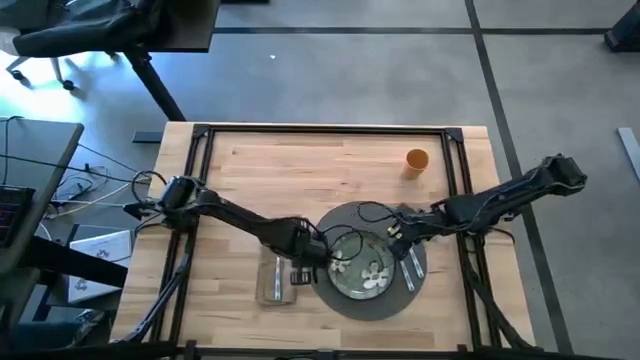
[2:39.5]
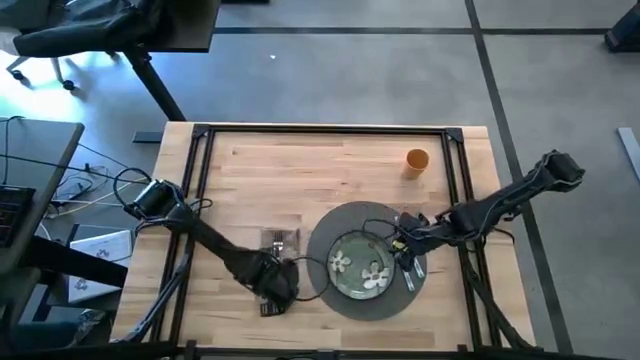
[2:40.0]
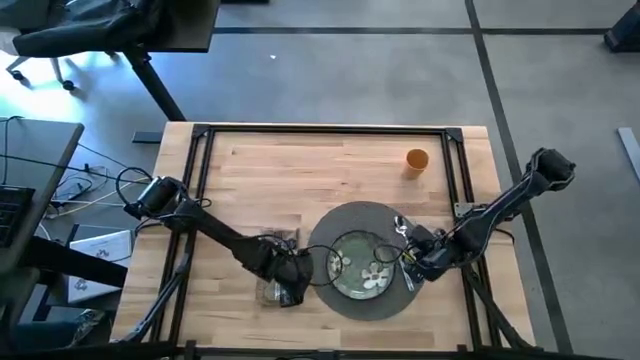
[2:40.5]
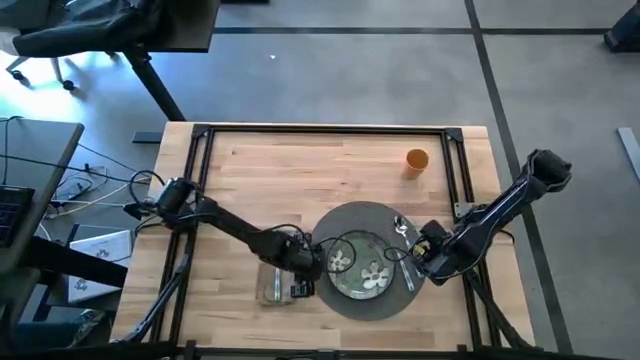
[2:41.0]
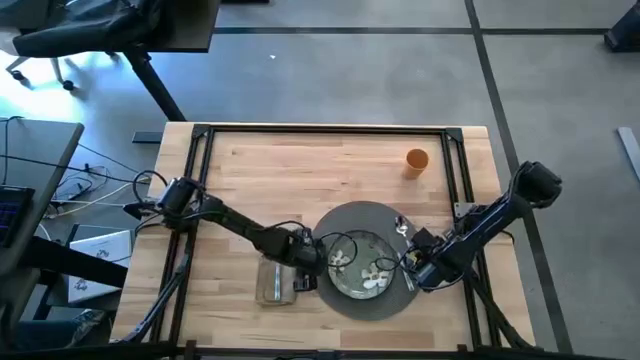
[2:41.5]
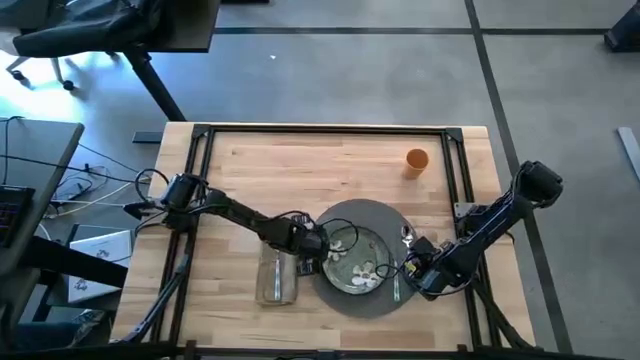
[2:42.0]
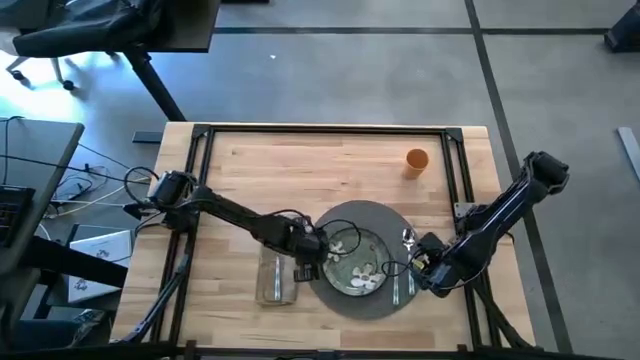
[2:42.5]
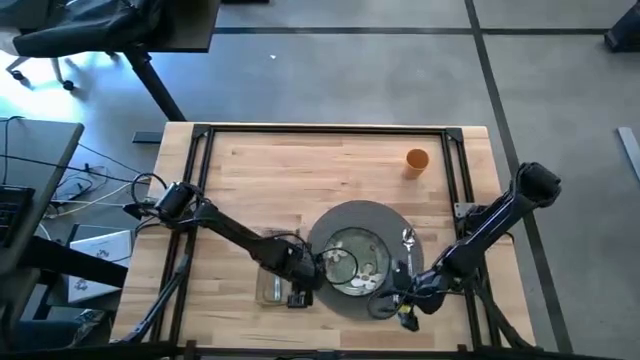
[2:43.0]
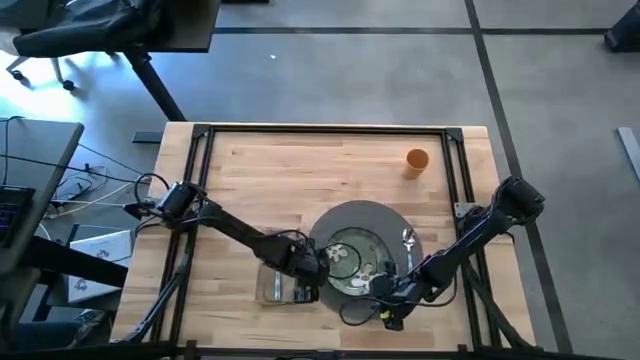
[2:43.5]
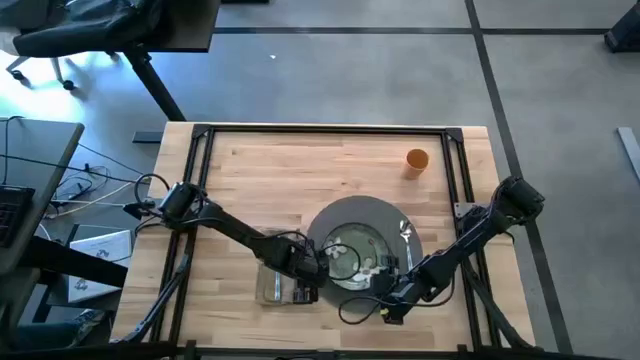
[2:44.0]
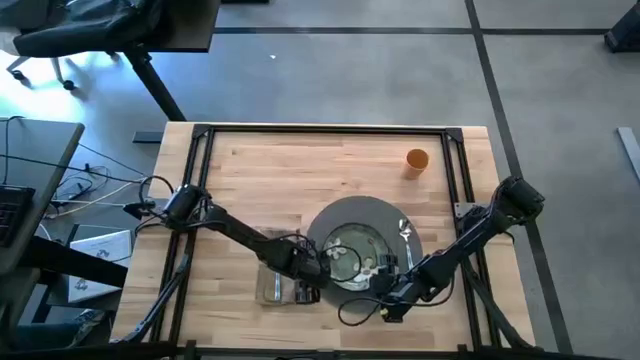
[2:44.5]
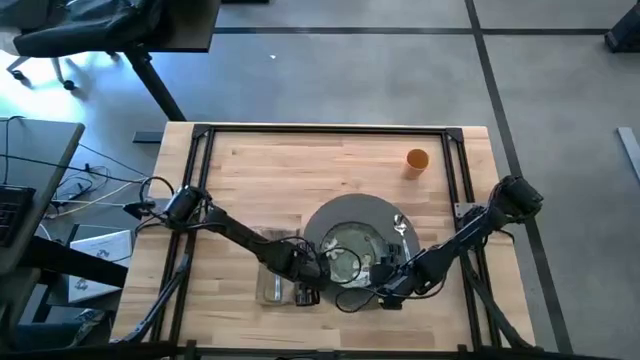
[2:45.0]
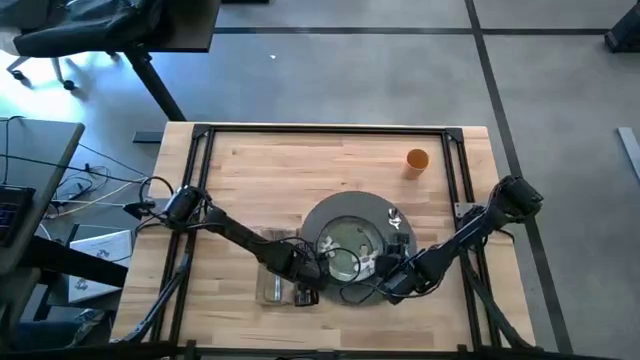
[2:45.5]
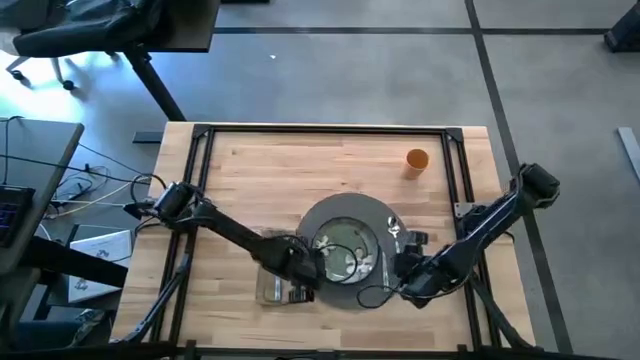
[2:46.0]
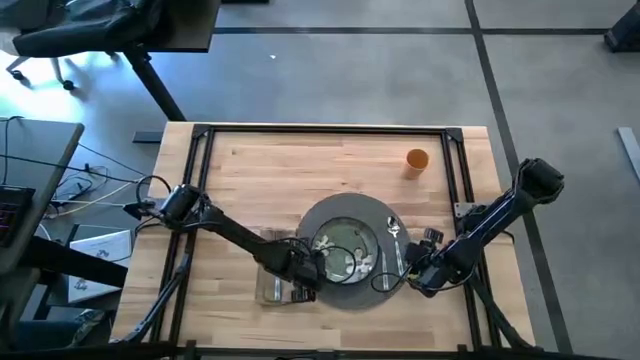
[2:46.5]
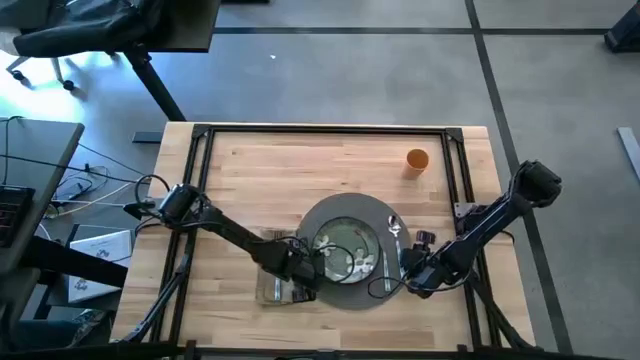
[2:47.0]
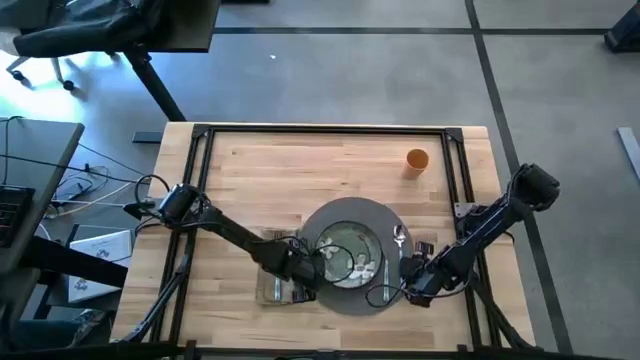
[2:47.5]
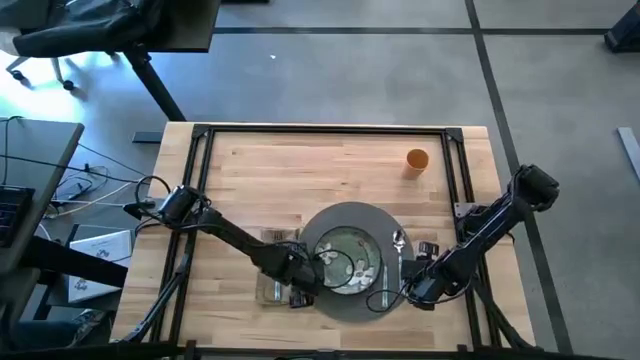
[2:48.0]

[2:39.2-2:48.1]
Task: Set table place
Adjust the gray placemat

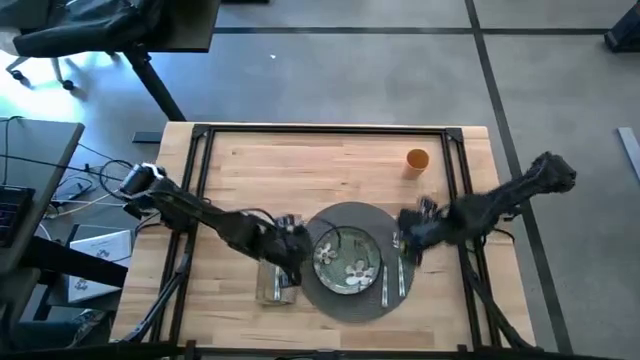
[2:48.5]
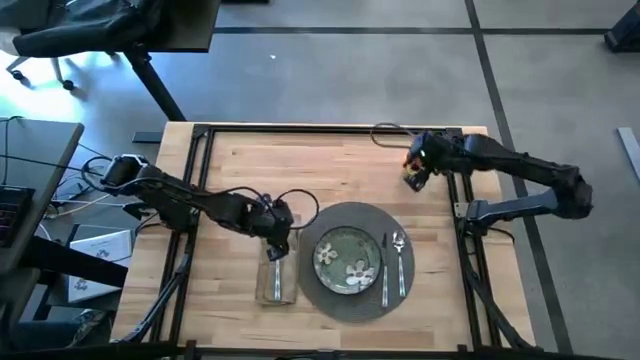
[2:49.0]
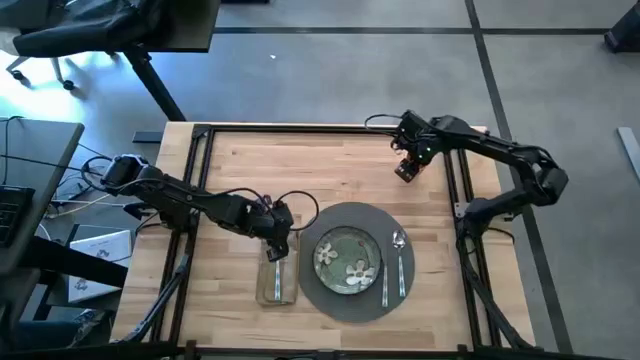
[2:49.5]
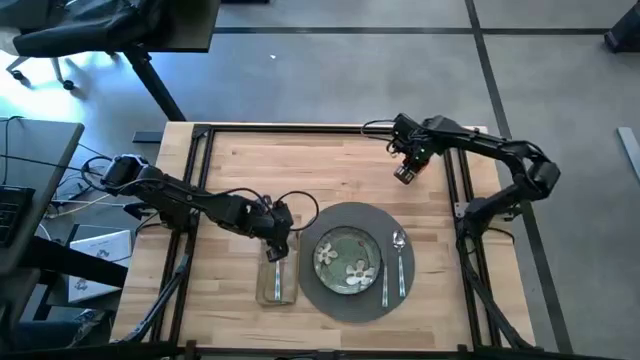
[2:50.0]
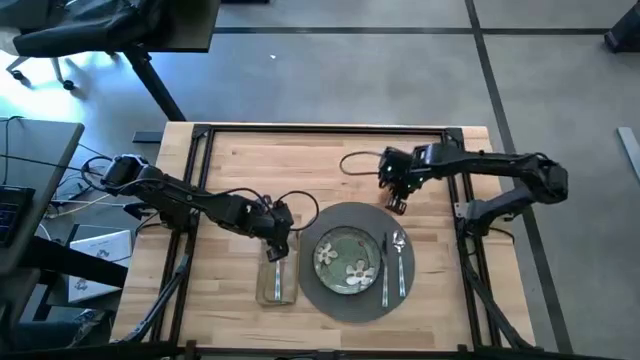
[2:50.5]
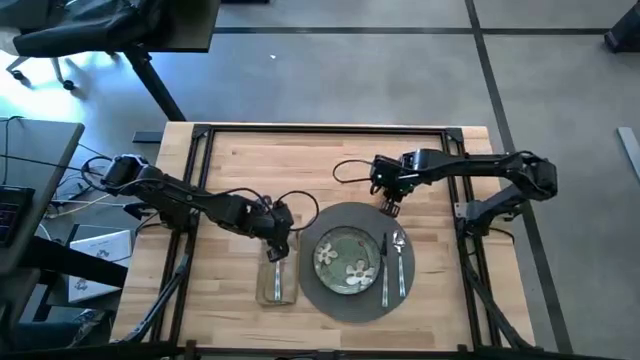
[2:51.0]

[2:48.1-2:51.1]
Put the orange cup to the top of the gray placemat

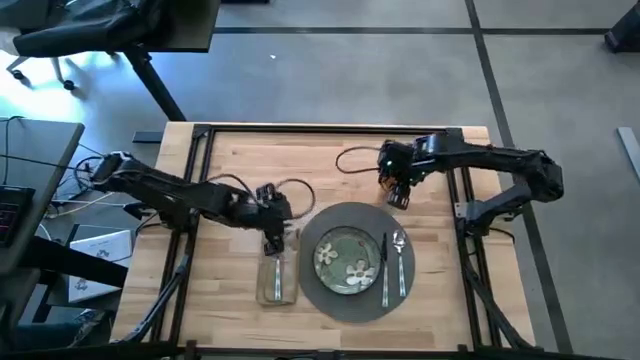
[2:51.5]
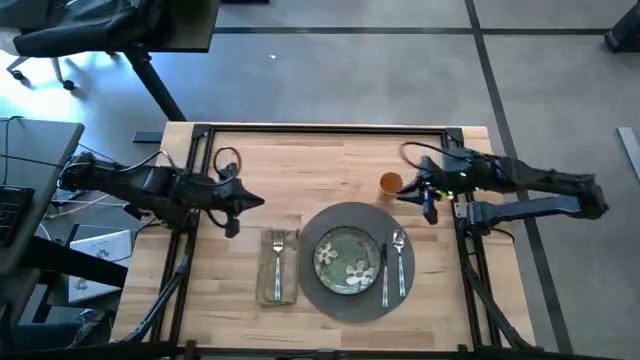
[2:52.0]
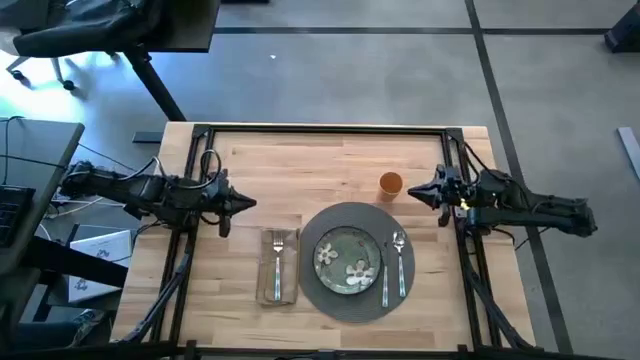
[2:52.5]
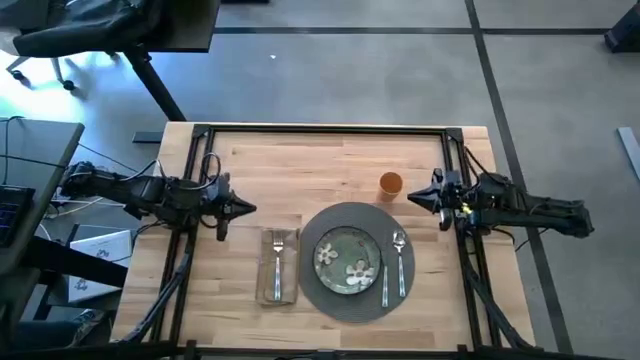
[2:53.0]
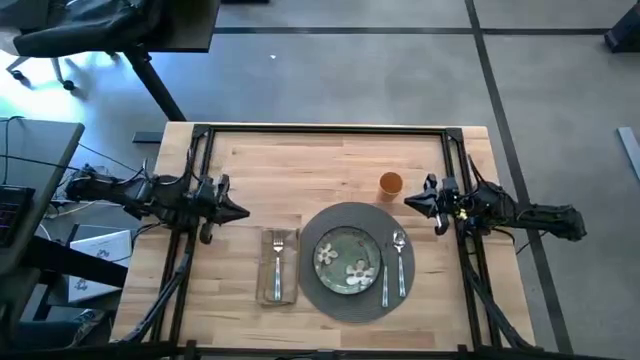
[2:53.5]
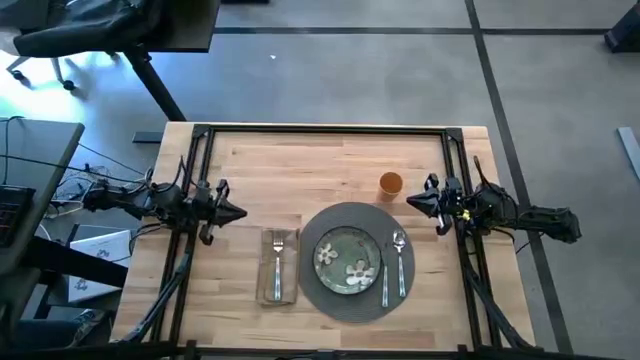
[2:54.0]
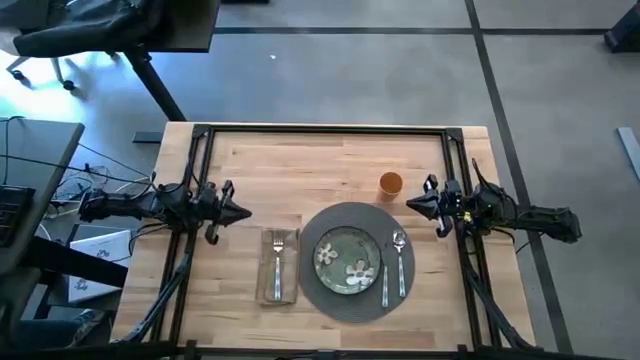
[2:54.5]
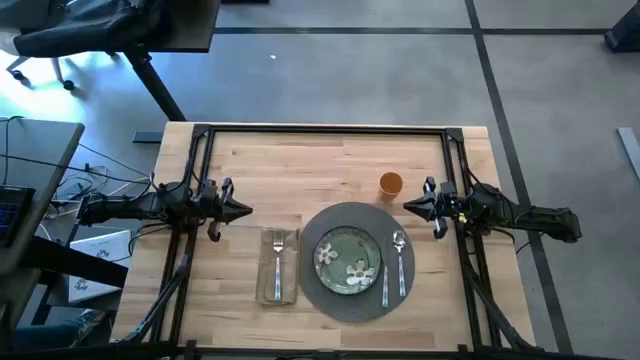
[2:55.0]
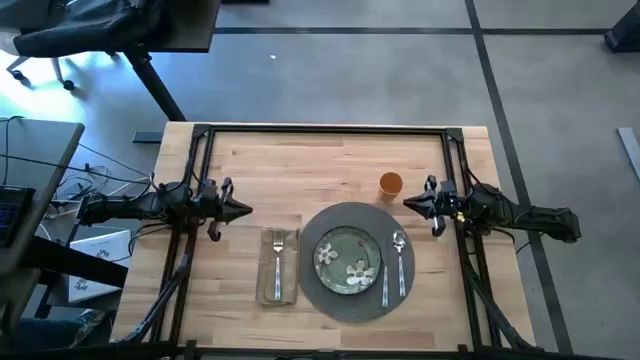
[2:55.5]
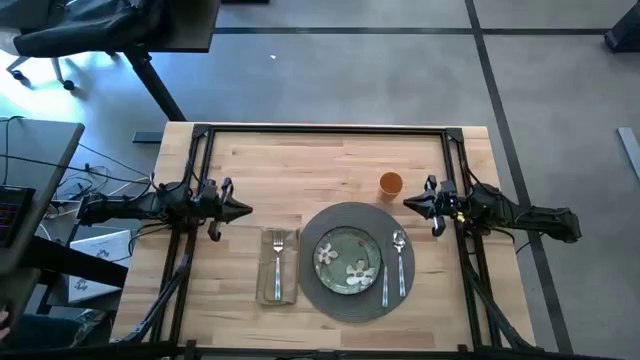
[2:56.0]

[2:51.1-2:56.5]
Return to Home Position

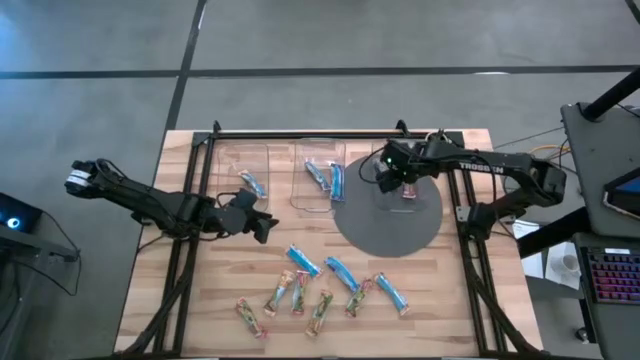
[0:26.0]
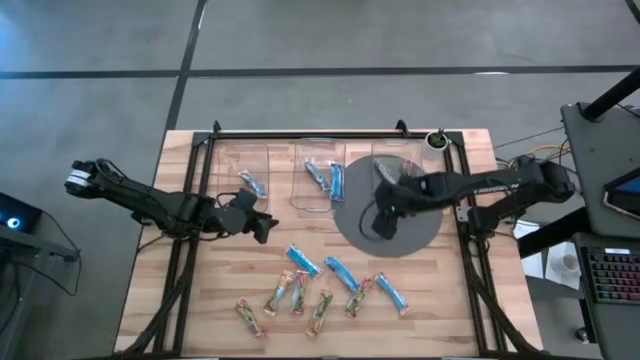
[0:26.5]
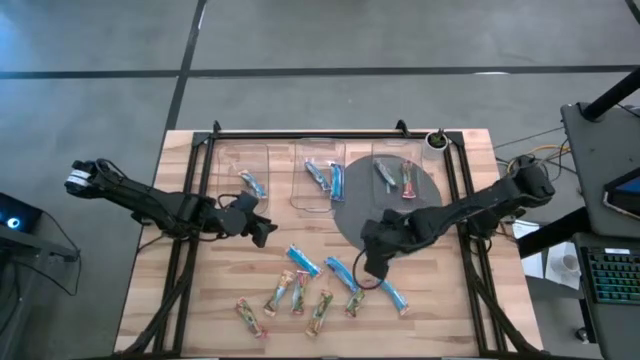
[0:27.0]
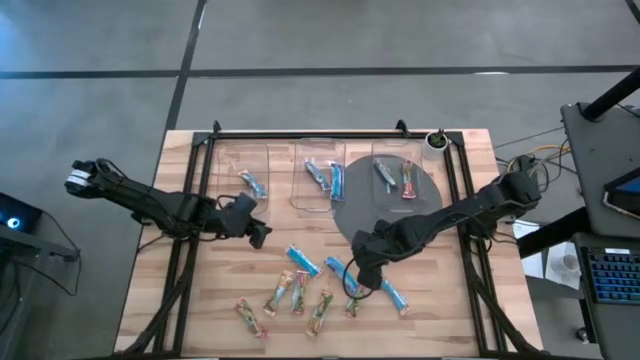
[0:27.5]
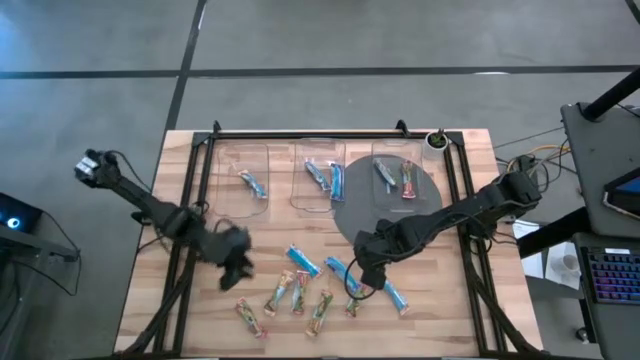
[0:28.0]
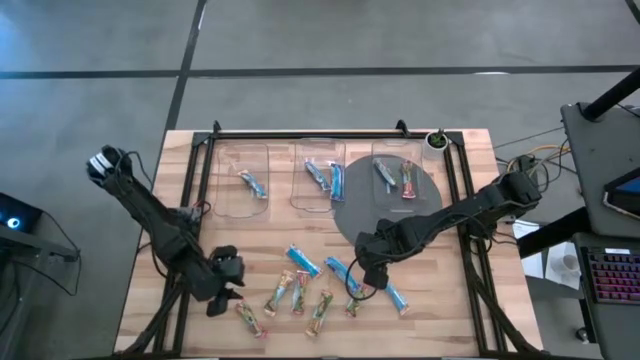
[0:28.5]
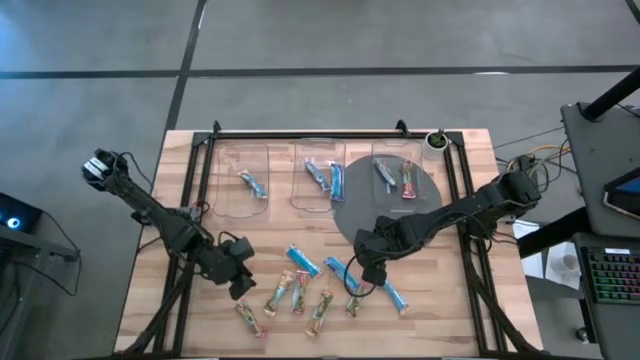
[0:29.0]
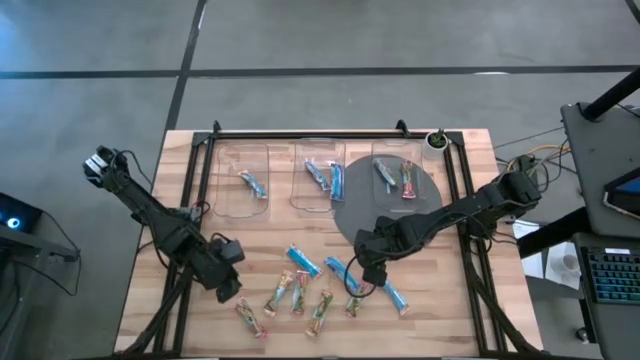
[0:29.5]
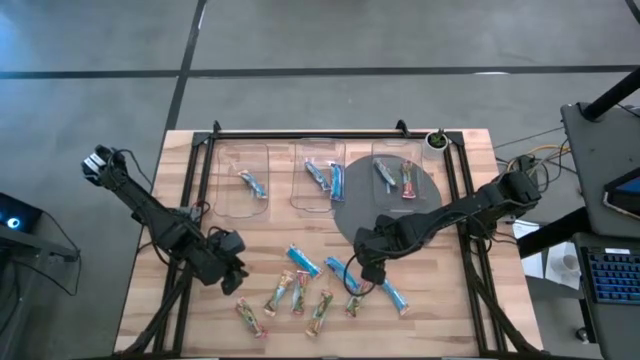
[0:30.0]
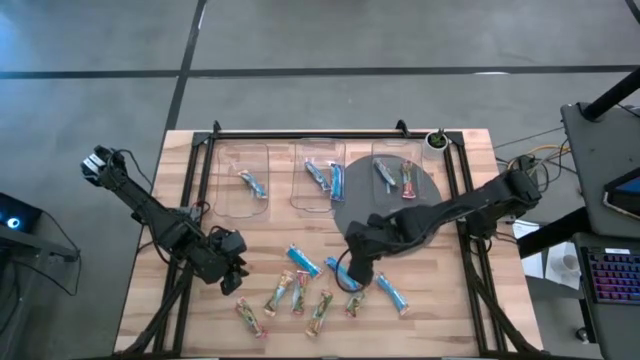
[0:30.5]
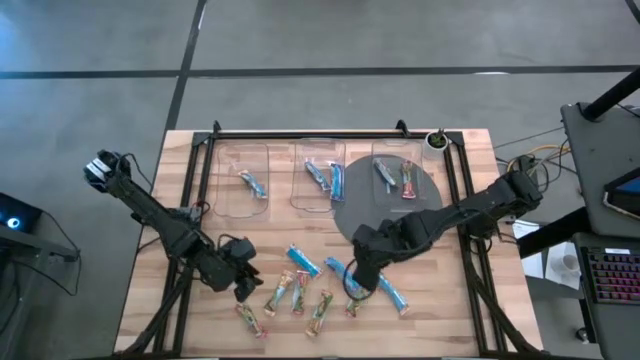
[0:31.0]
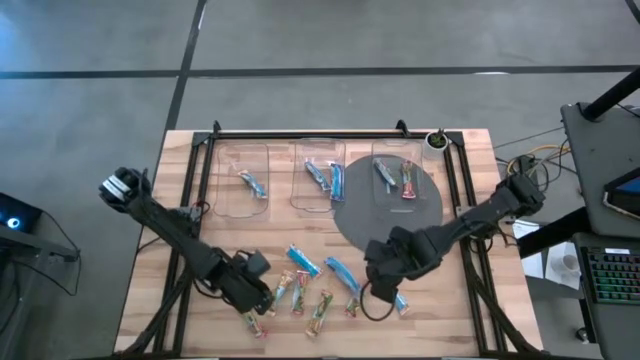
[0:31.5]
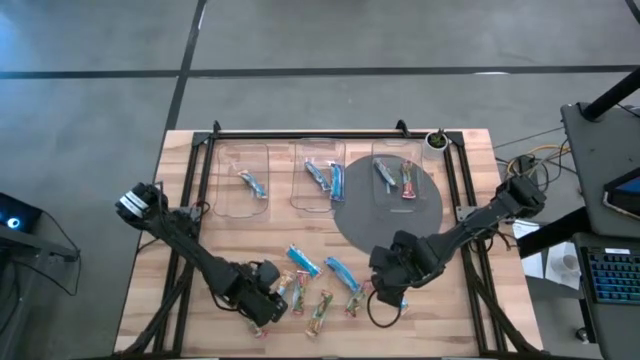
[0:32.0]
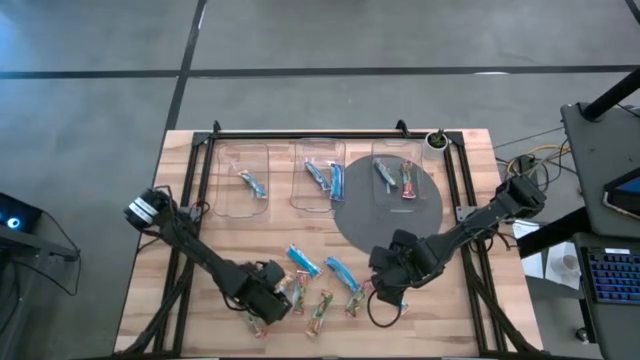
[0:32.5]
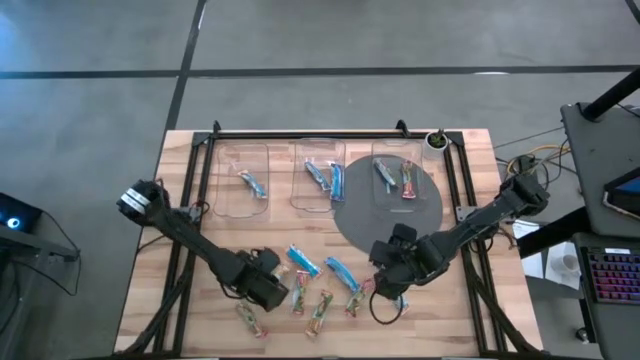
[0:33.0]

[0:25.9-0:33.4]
Task: Pick and place Granola Bars by type
Put the orange granola bar into the left transparent container
